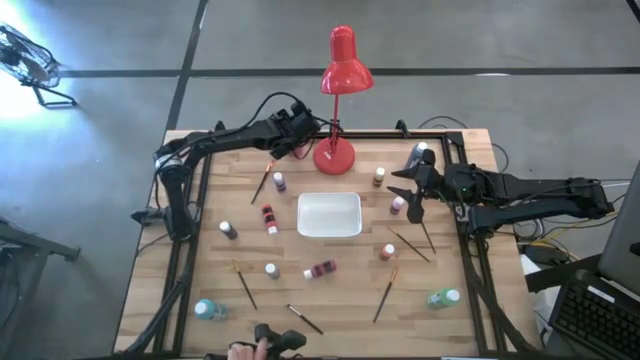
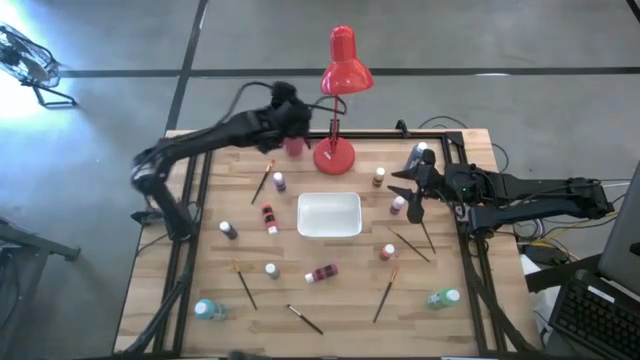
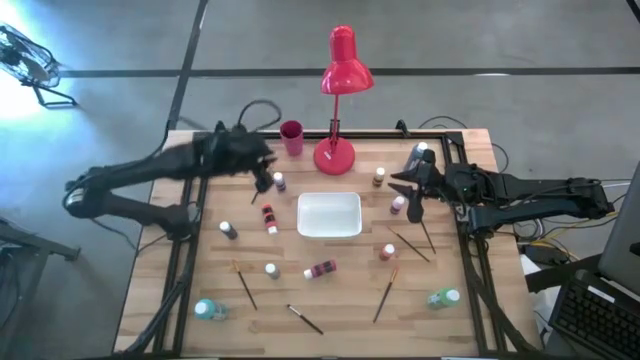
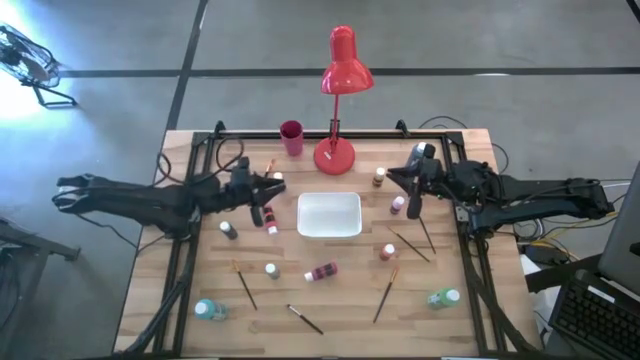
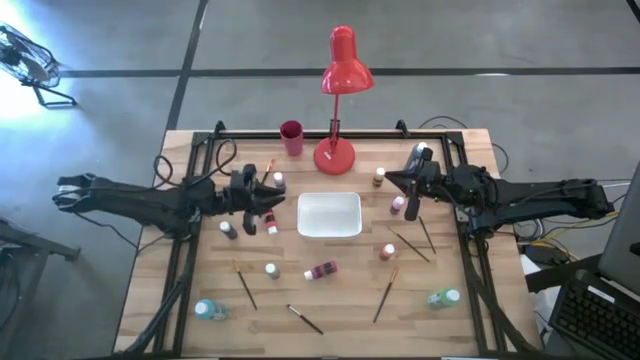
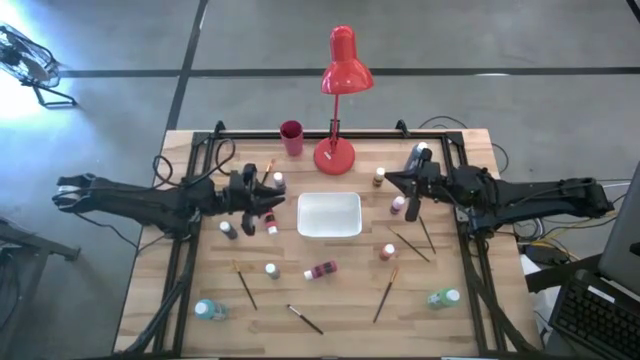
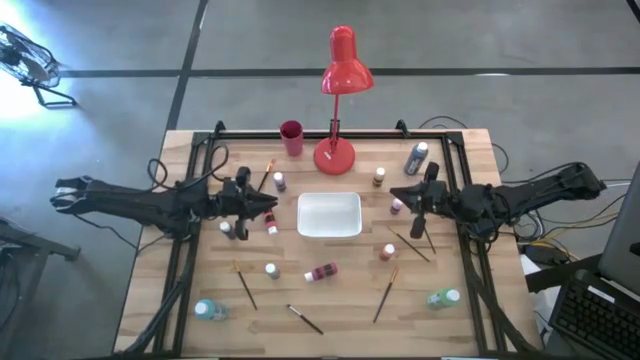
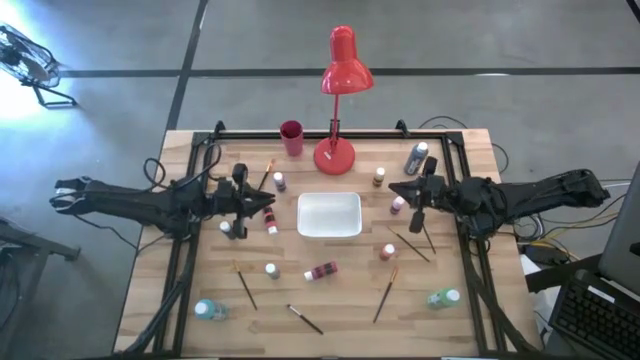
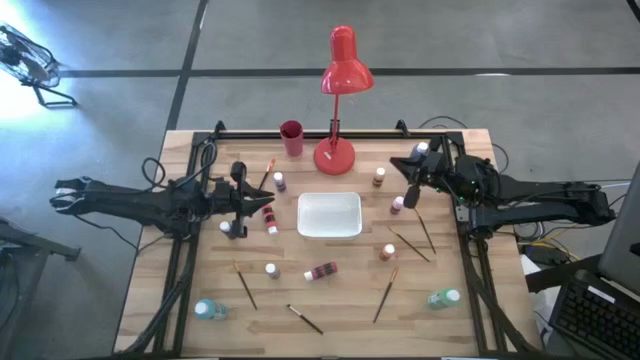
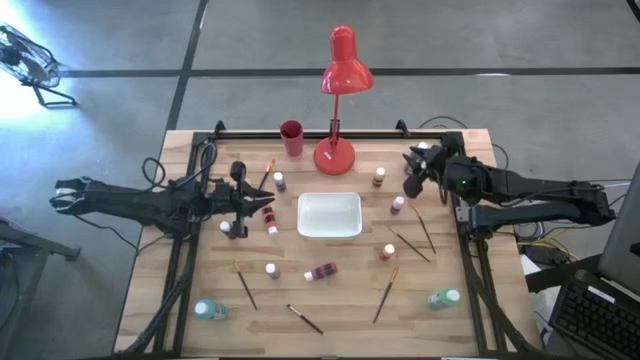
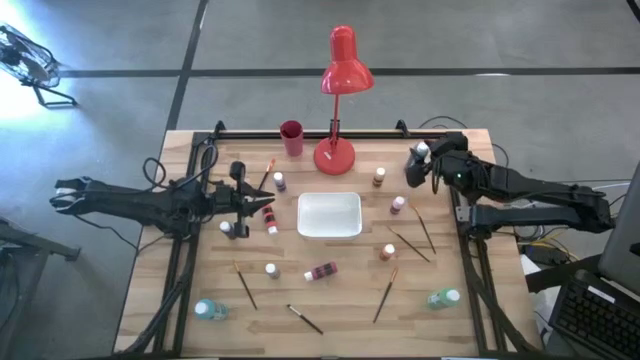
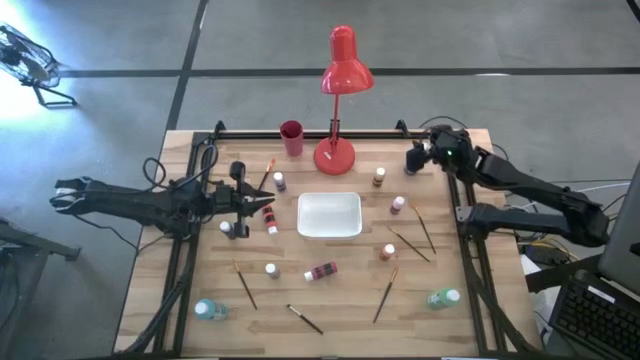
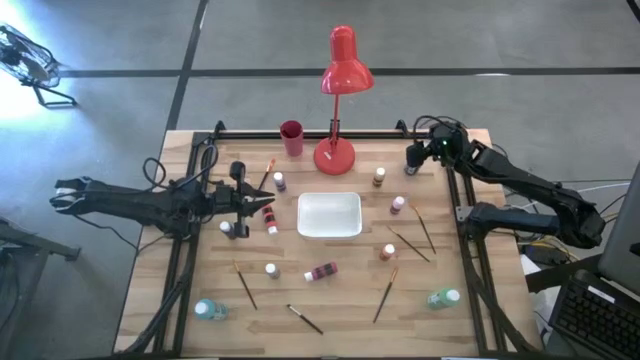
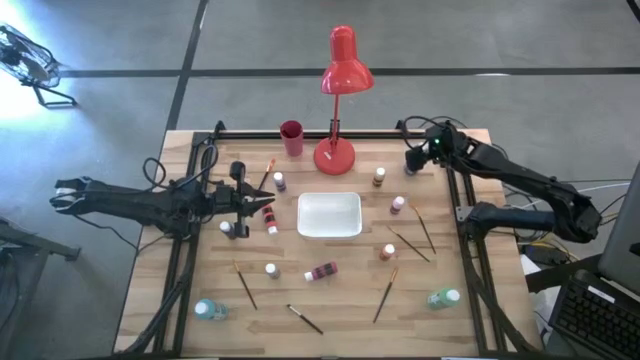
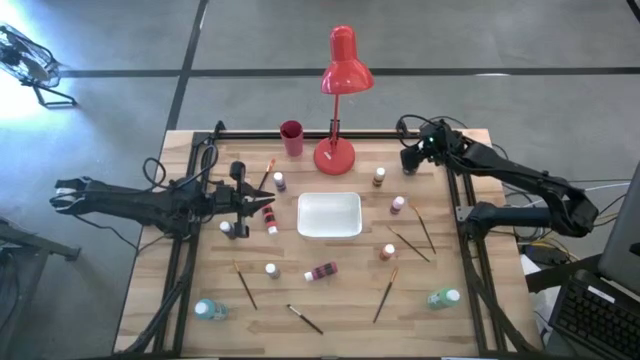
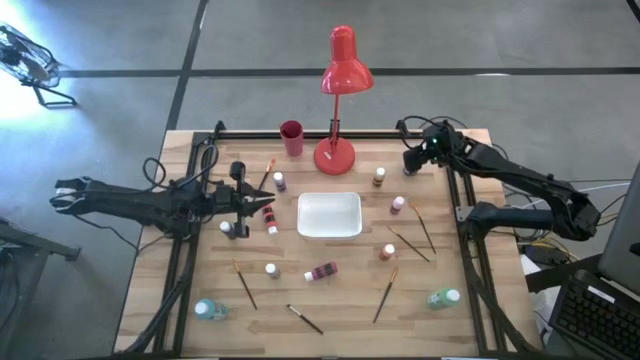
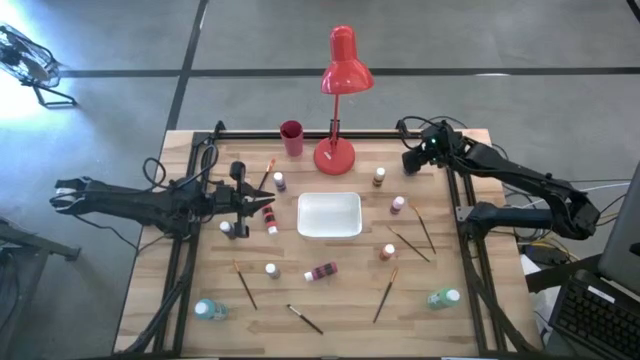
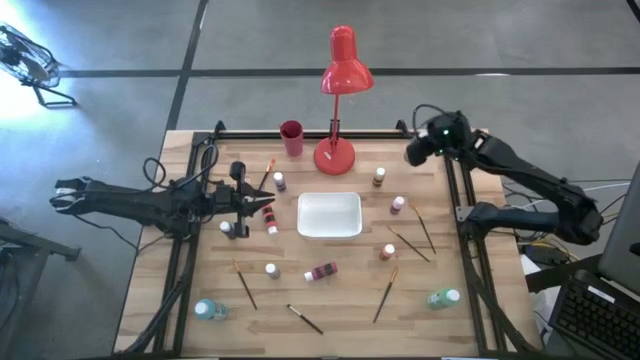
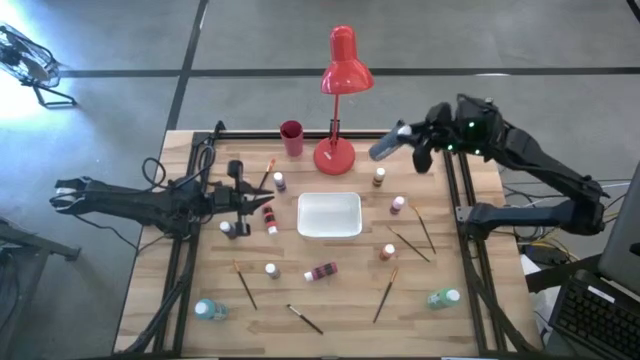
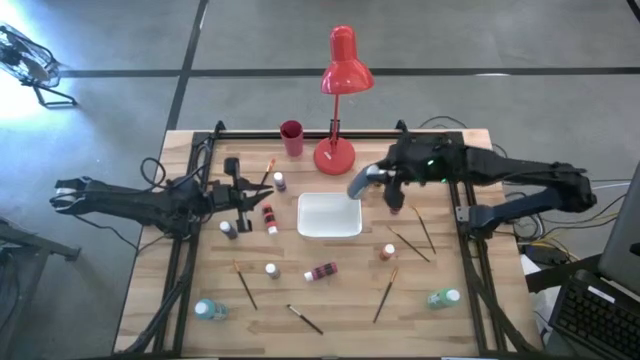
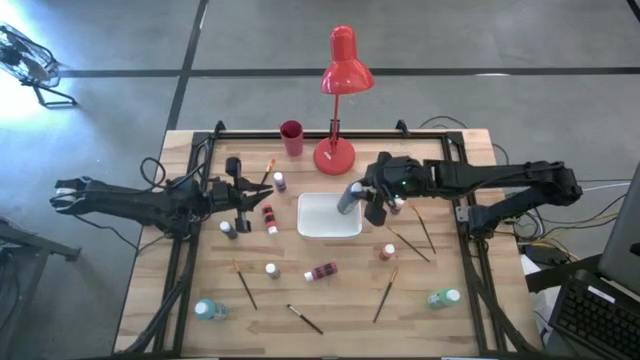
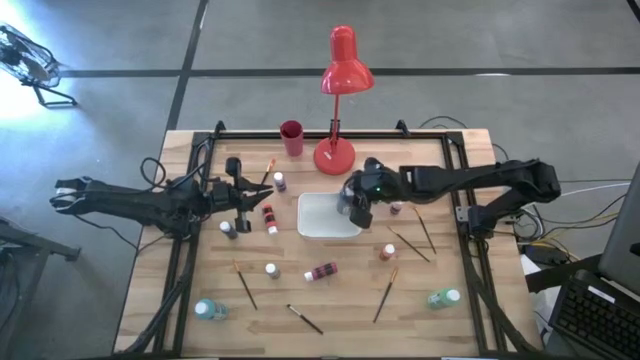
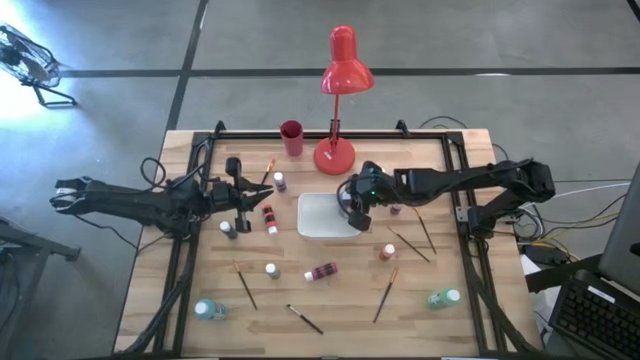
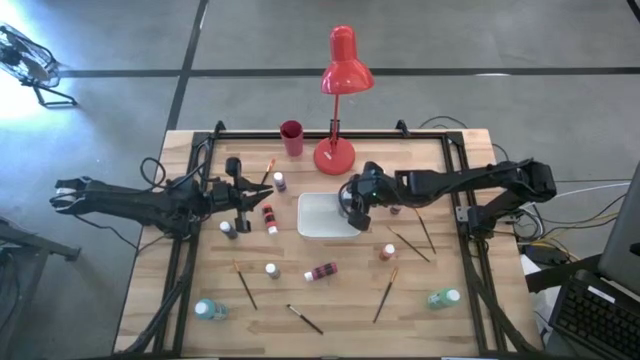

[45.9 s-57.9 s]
Task: Pick & Place Paint Supplies
Put the blue paint bottle into the white bin

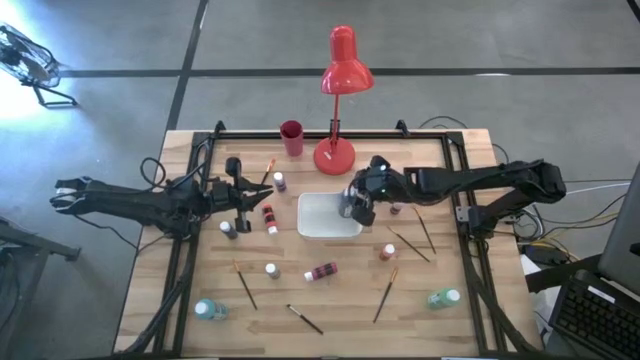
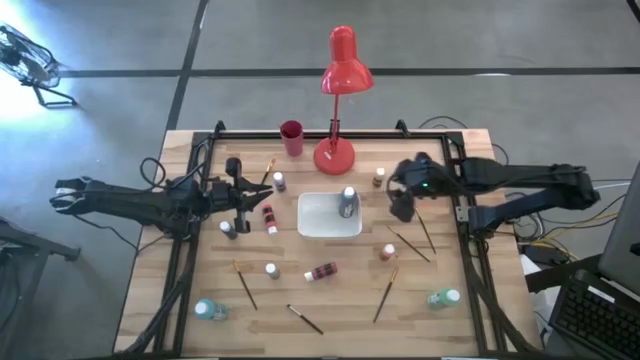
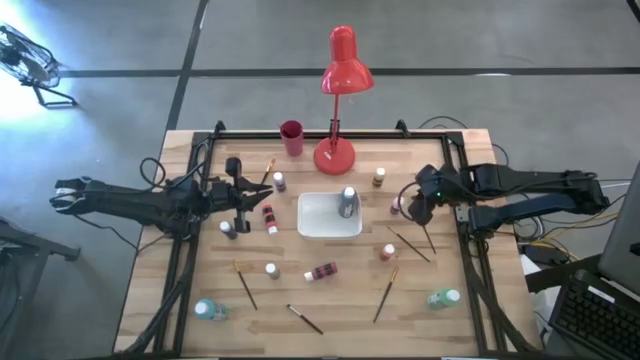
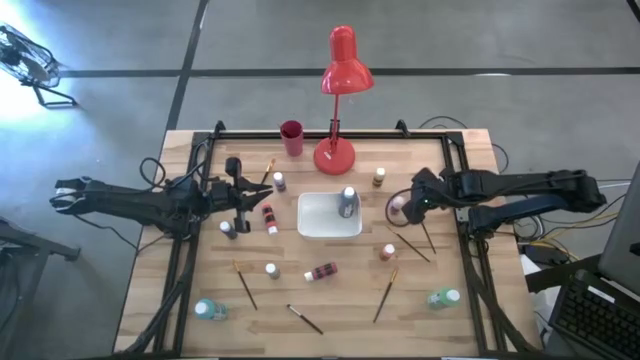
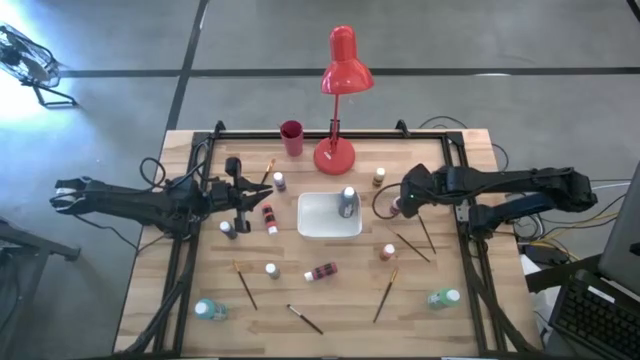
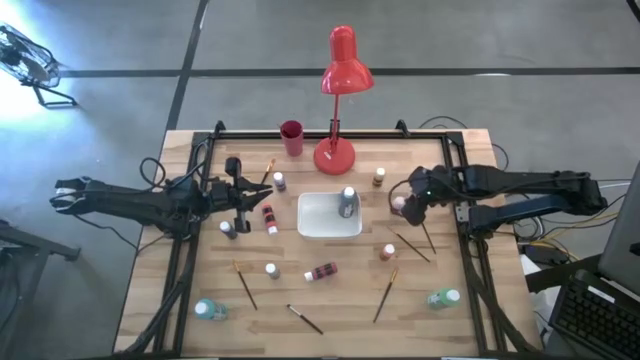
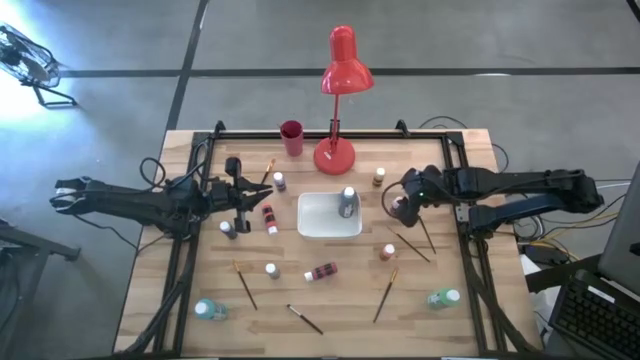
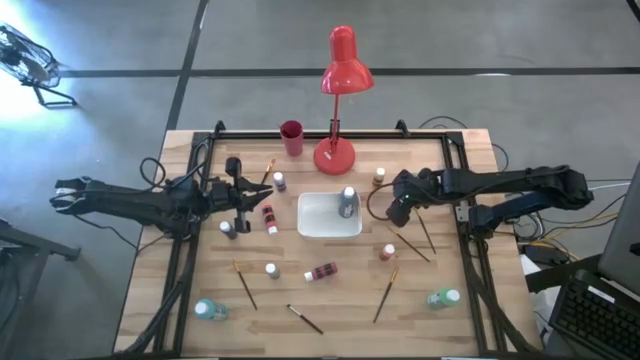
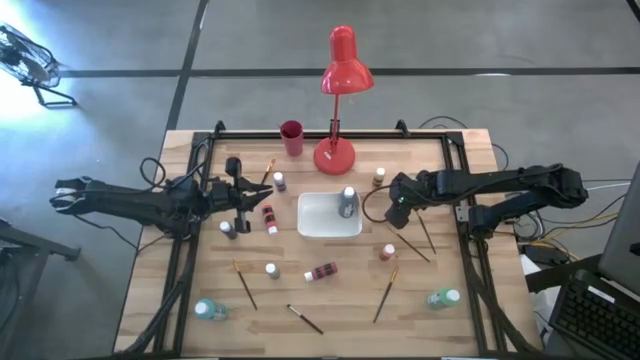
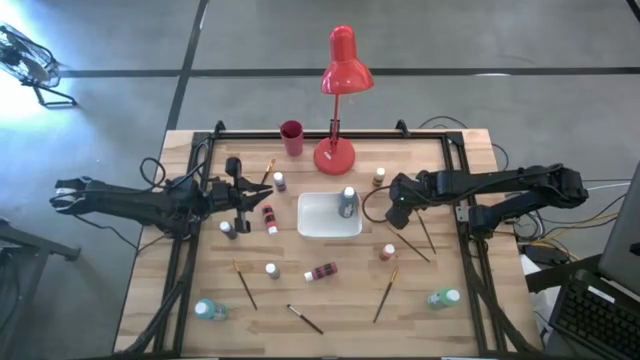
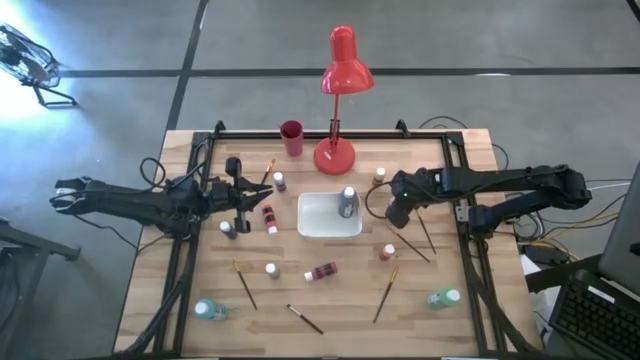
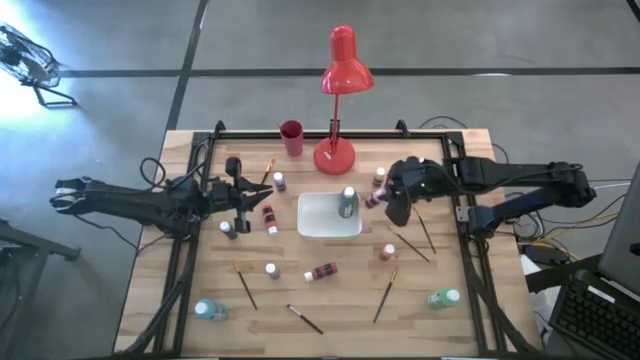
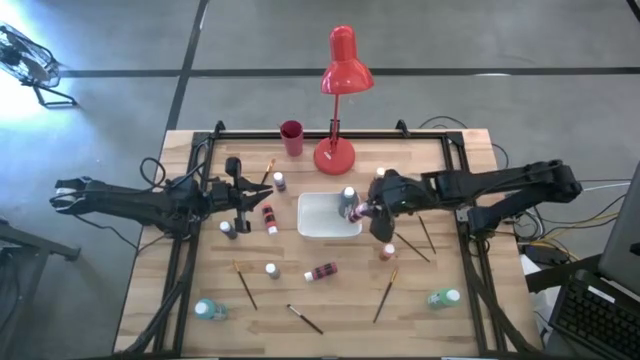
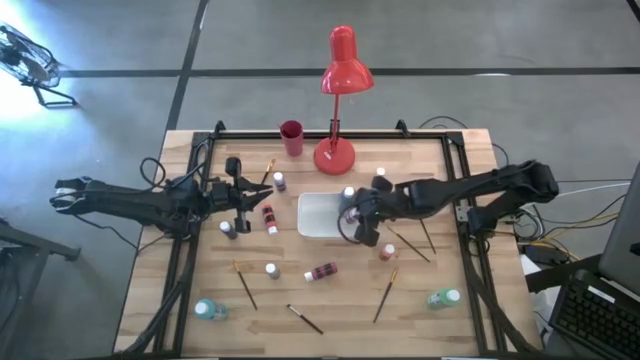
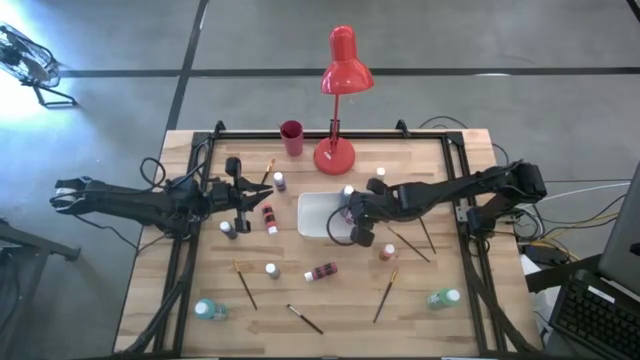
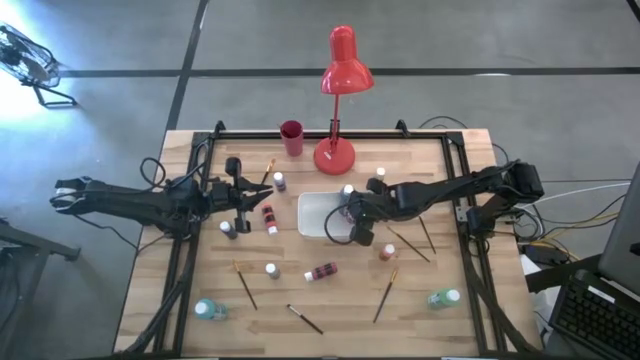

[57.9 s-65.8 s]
Put the pink paint bottle into the white bin

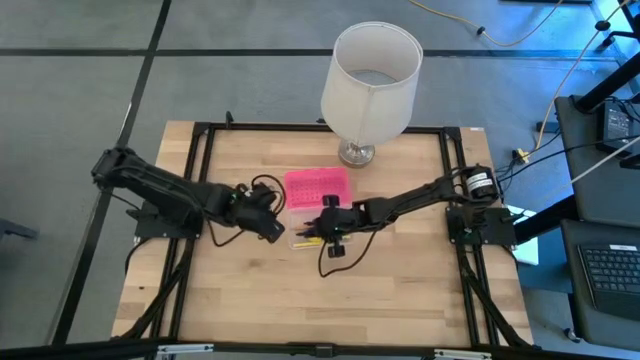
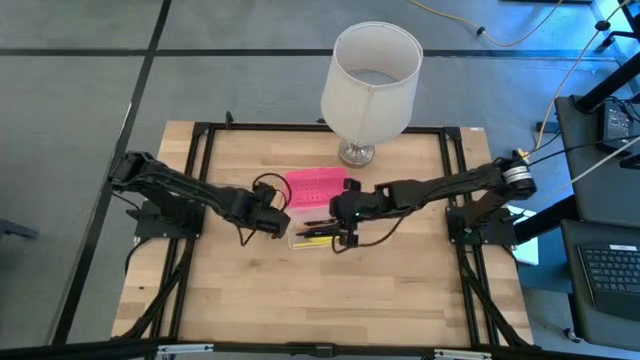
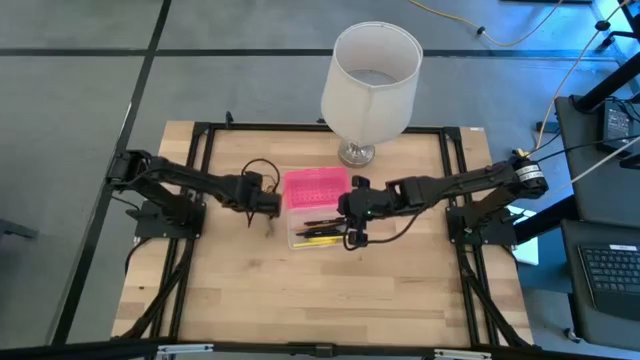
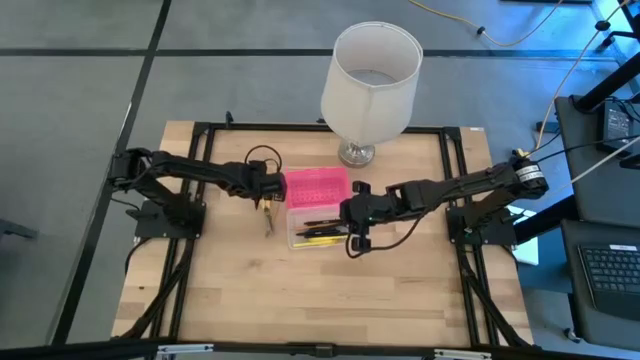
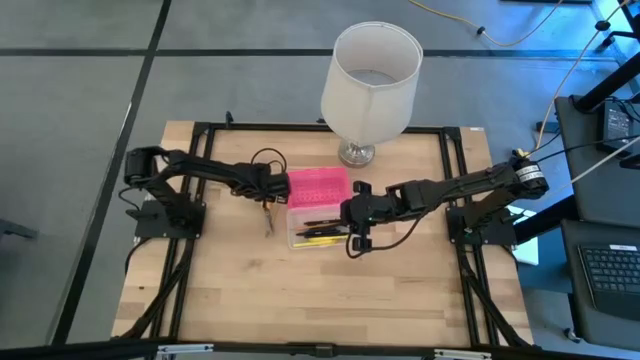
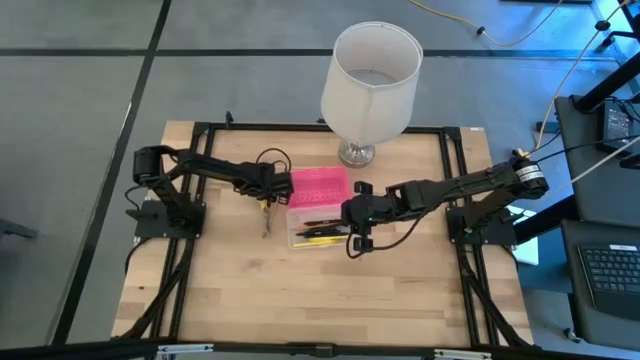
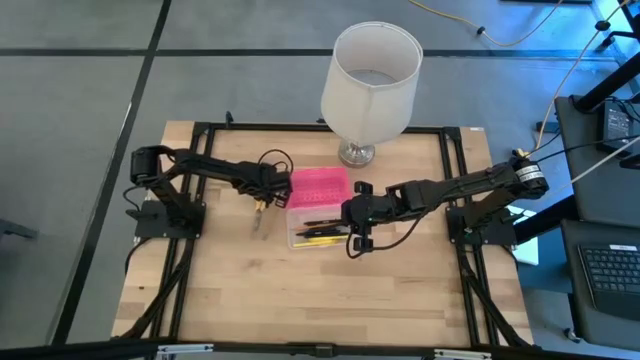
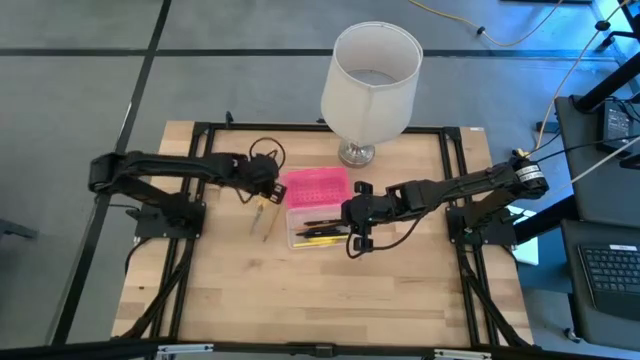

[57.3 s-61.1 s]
Task: Pick & place school supplies into a supply box
Put the yellow scissors into the supply box
